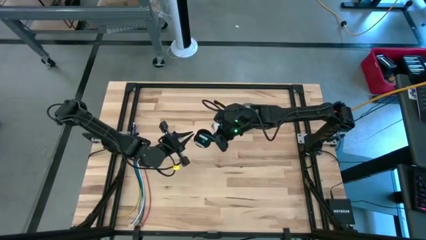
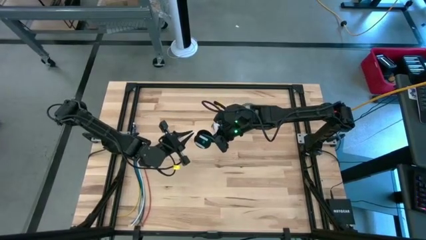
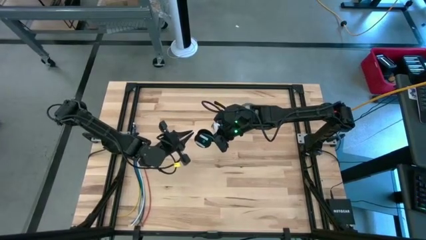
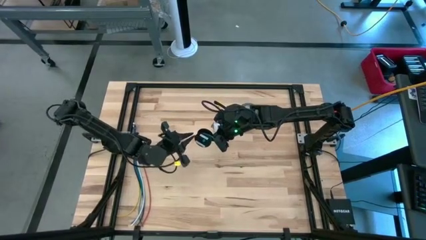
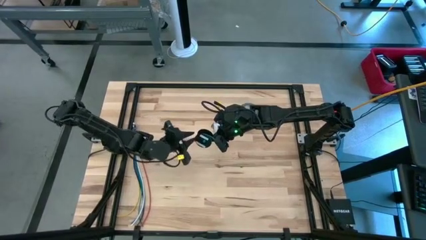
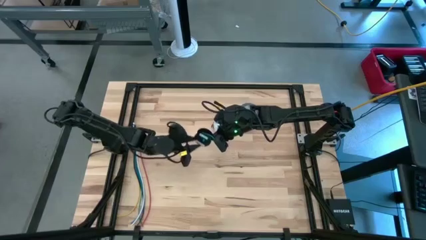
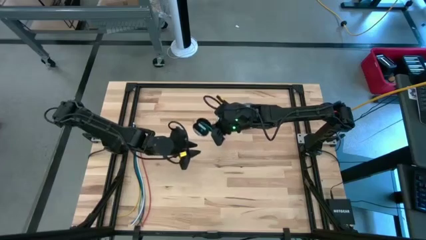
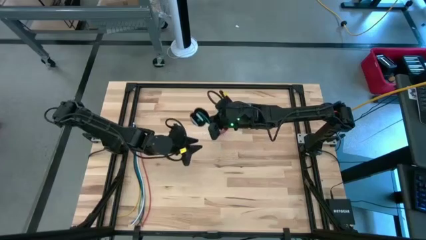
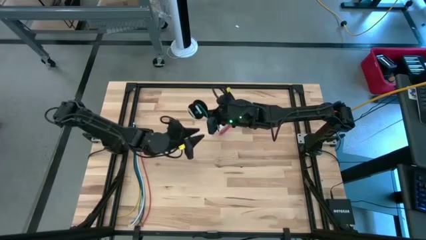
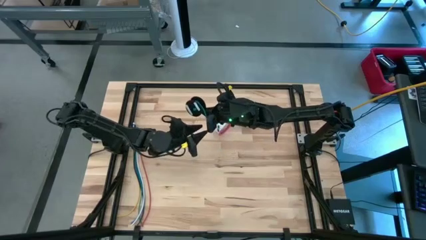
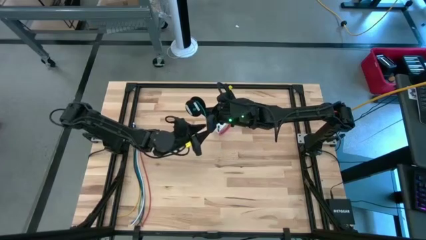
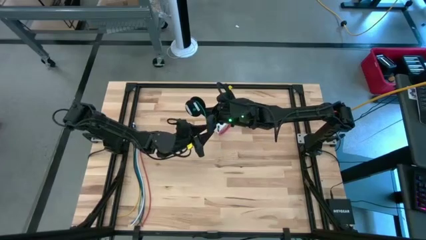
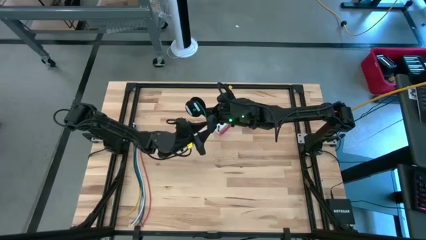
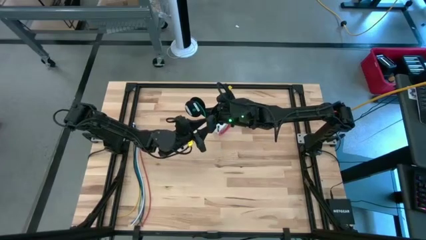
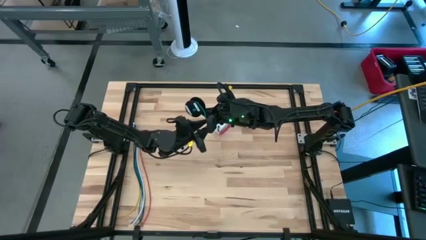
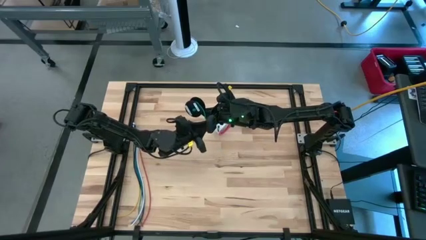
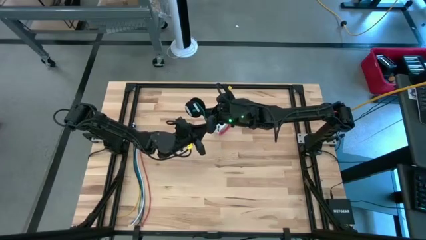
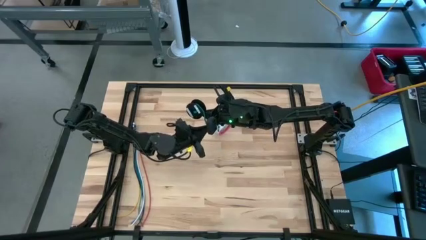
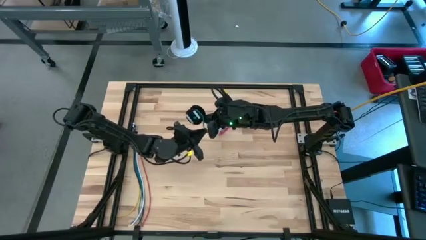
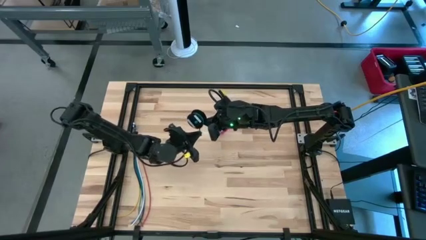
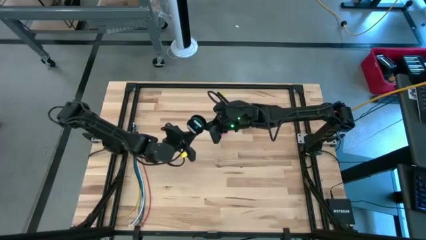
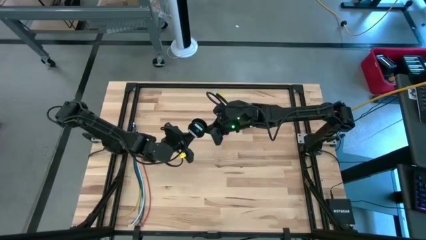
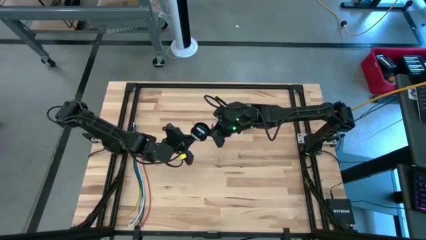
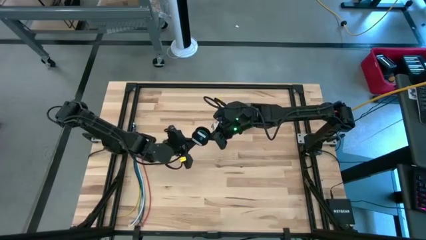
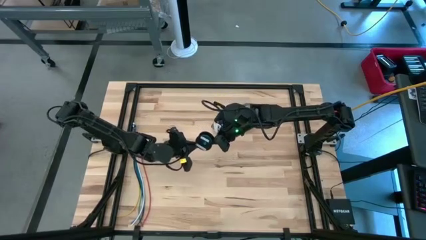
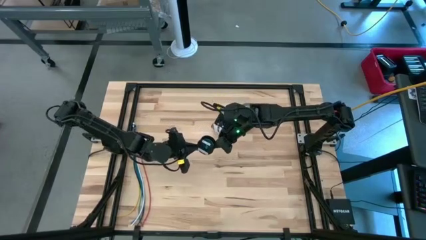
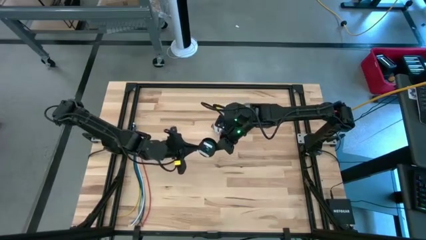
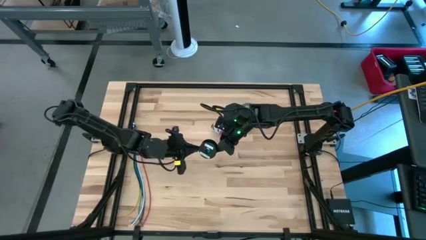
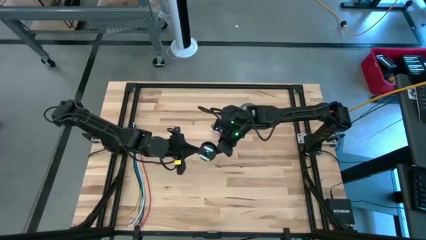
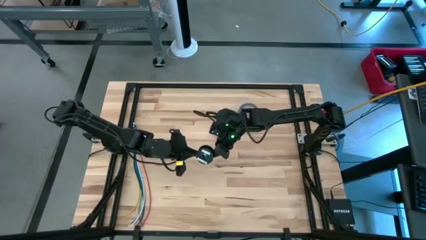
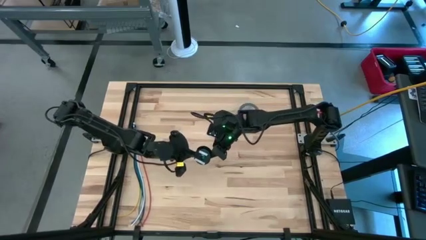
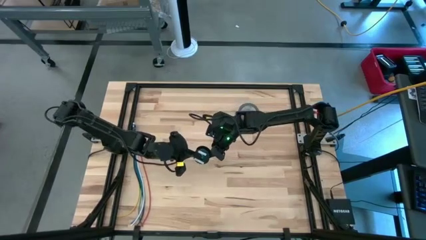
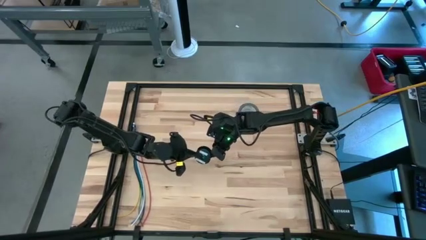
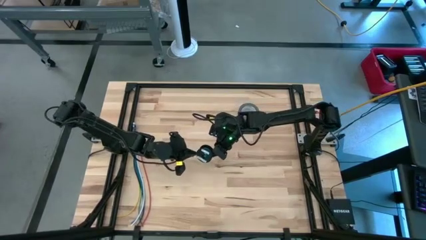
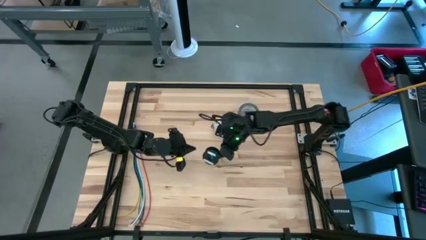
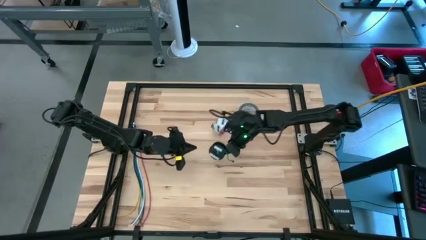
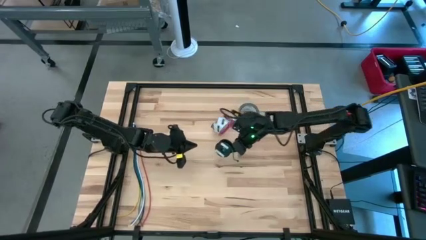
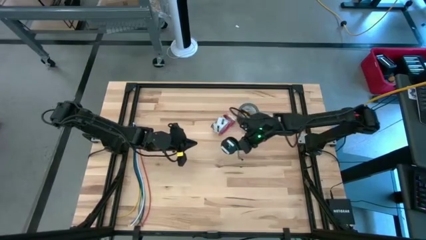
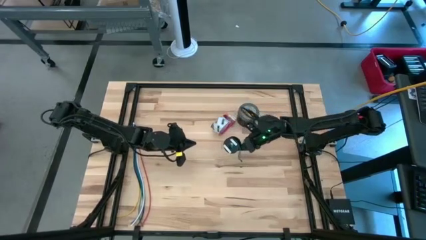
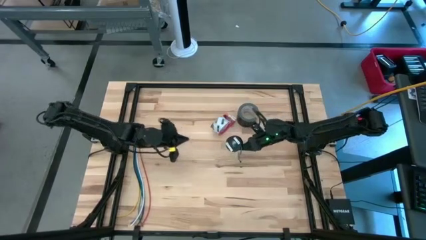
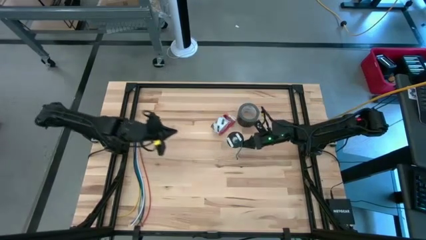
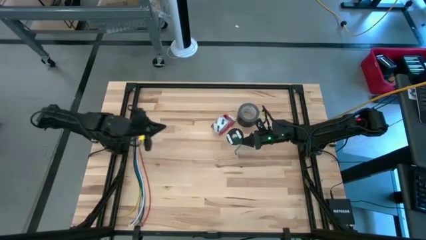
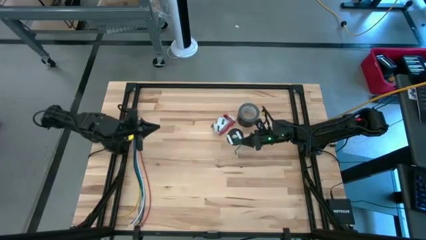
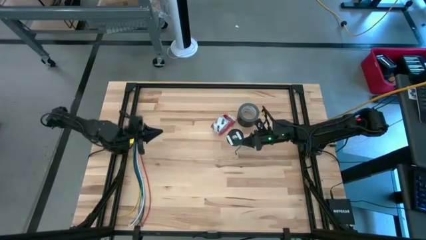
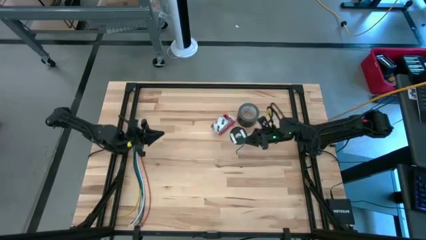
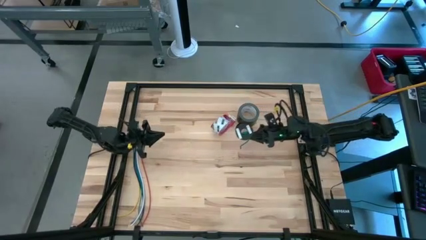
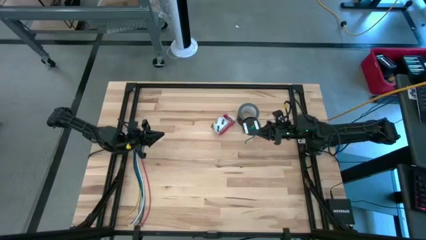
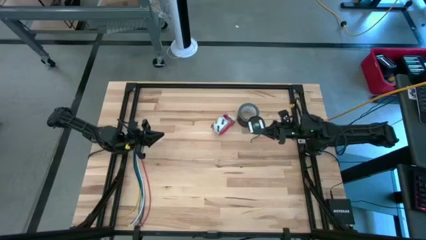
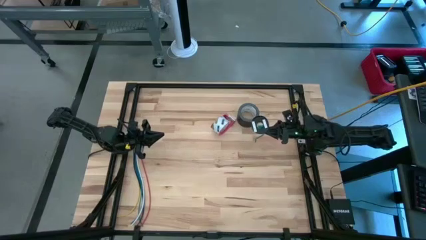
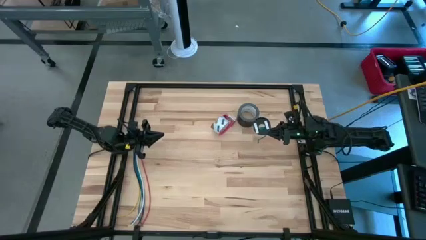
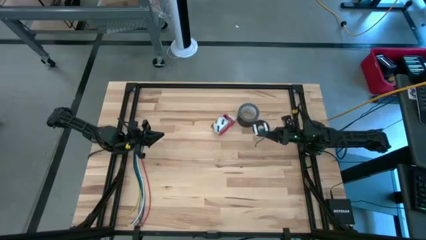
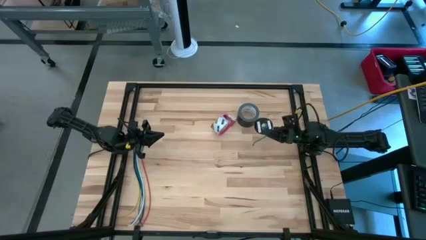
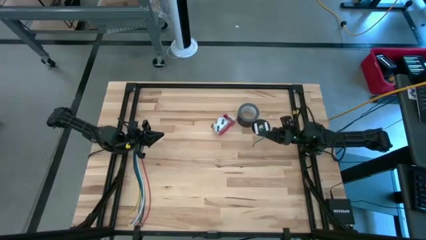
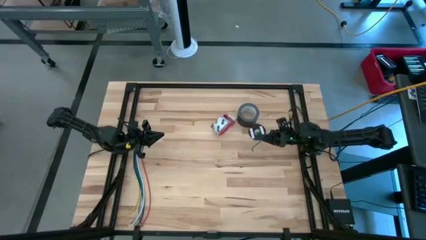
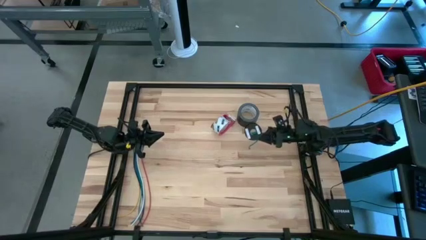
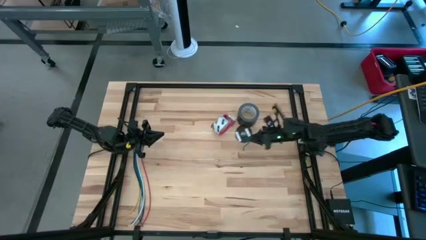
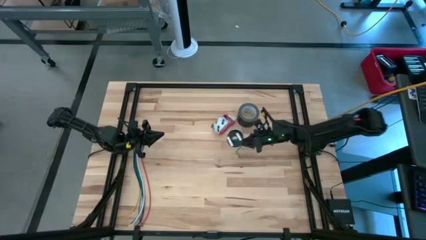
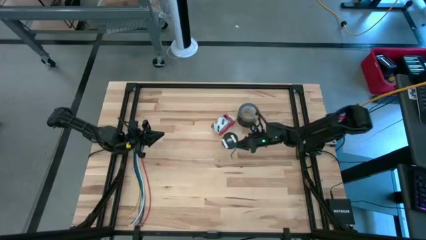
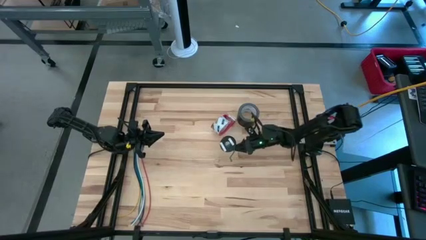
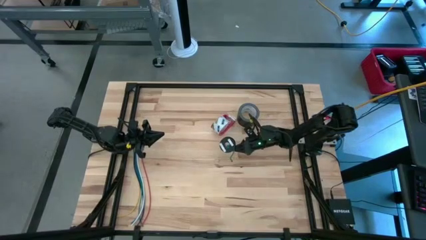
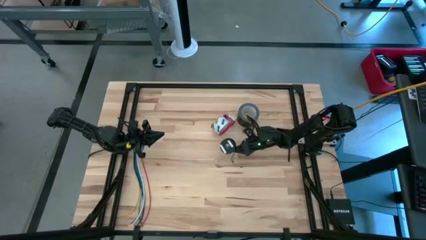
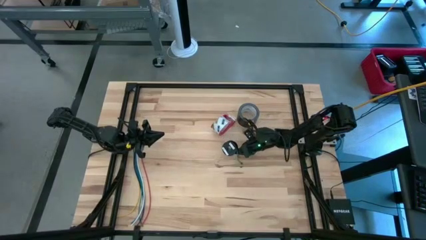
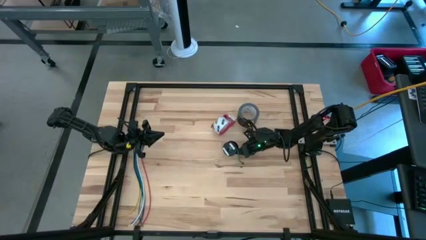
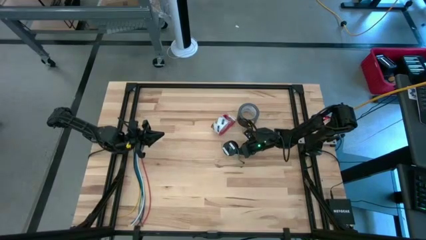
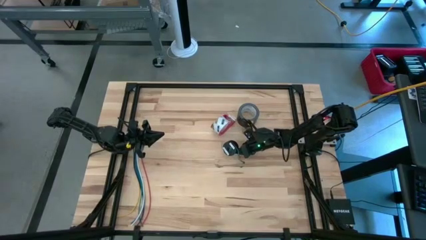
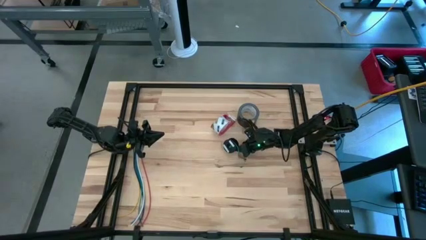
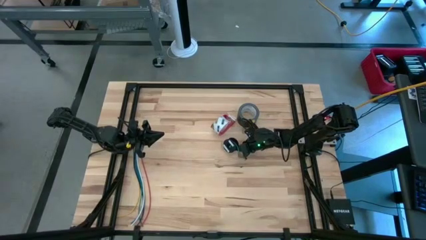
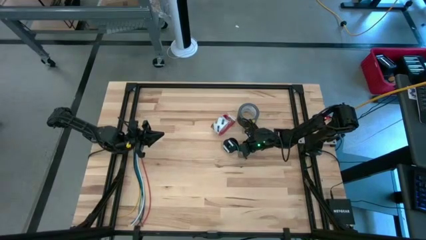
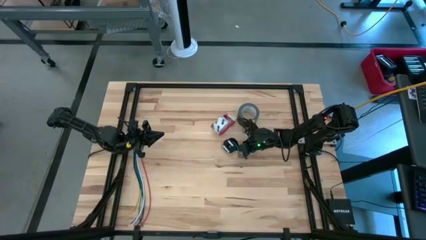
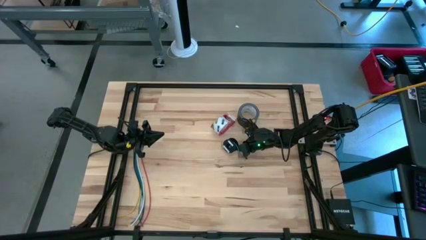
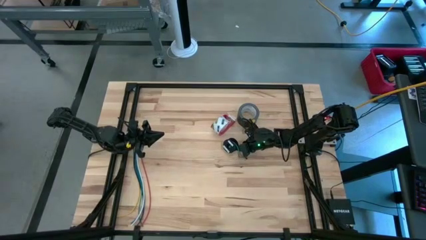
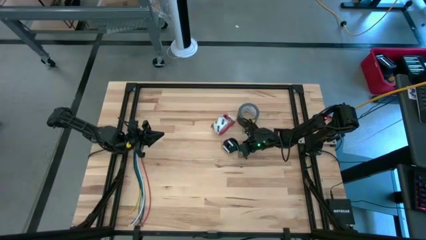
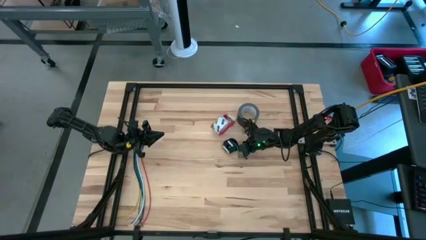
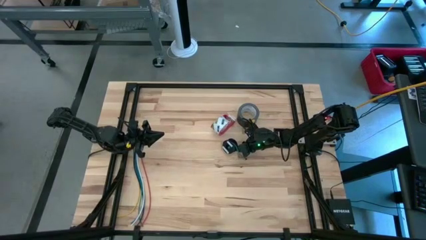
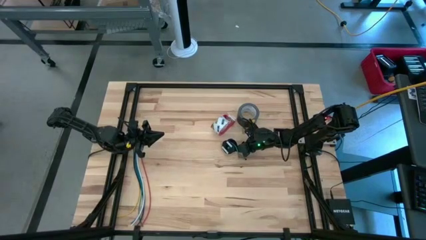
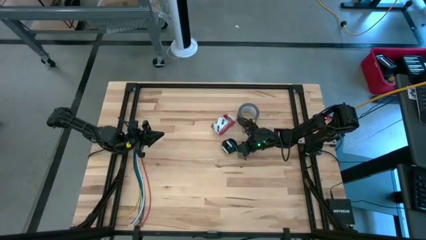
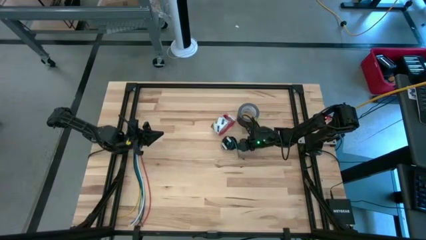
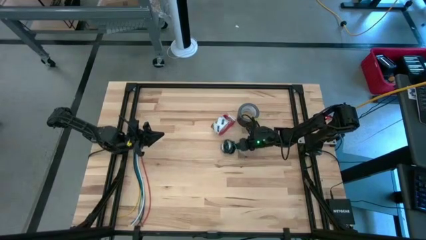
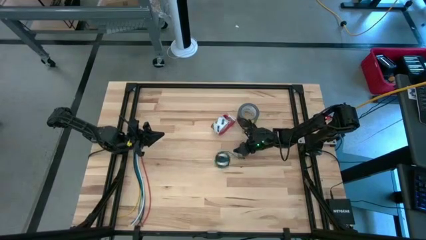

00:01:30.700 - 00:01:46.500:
Task: Coil cords
Coil the green wire on the spool
